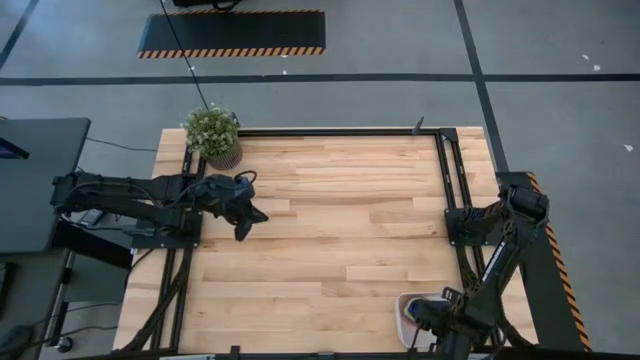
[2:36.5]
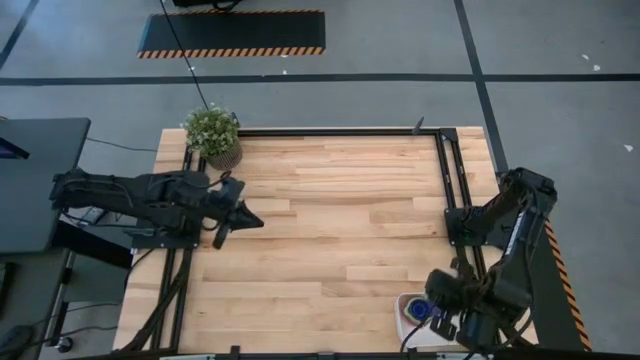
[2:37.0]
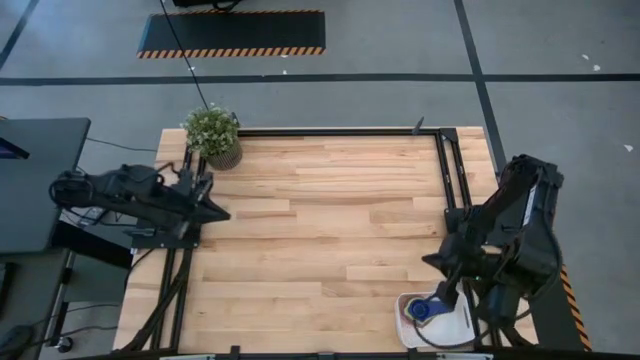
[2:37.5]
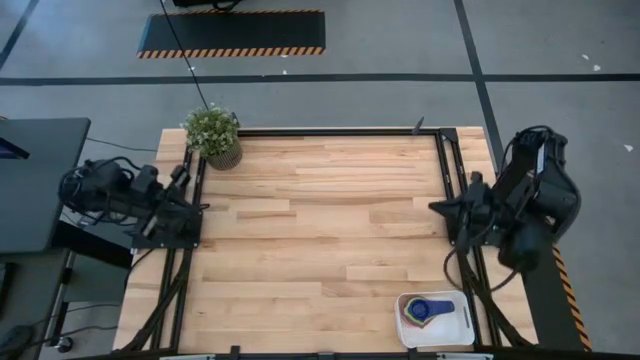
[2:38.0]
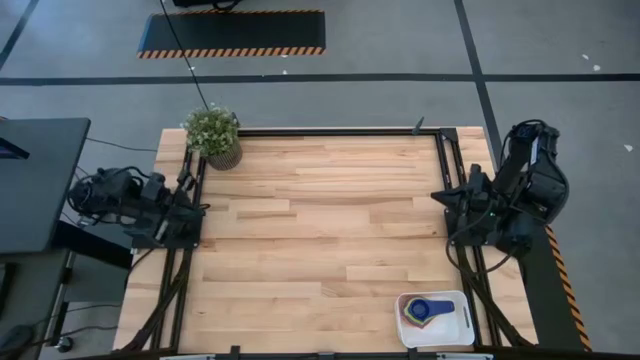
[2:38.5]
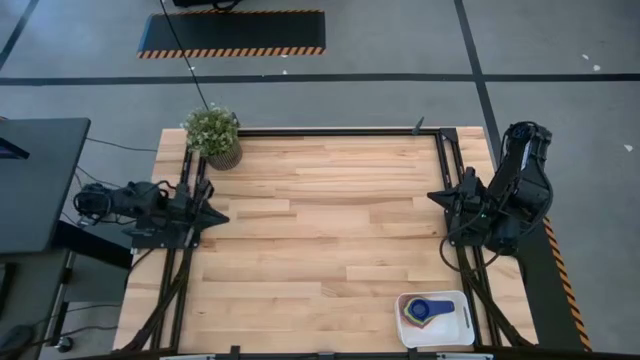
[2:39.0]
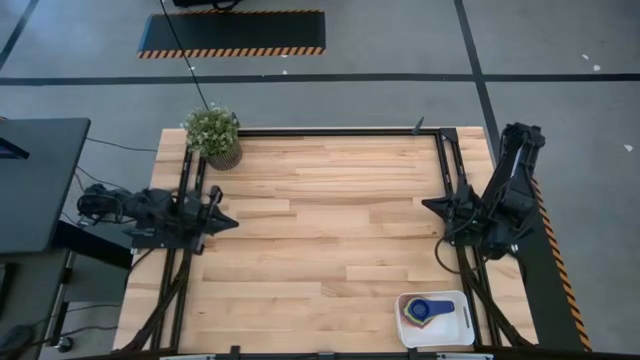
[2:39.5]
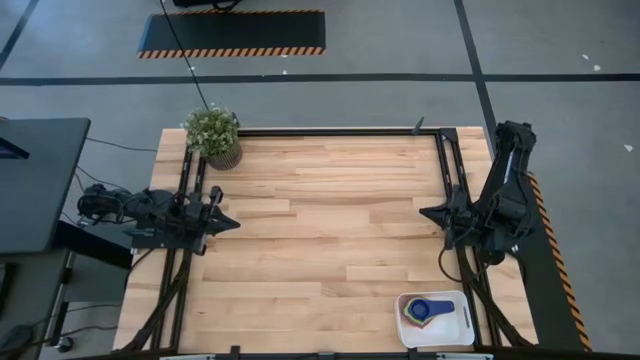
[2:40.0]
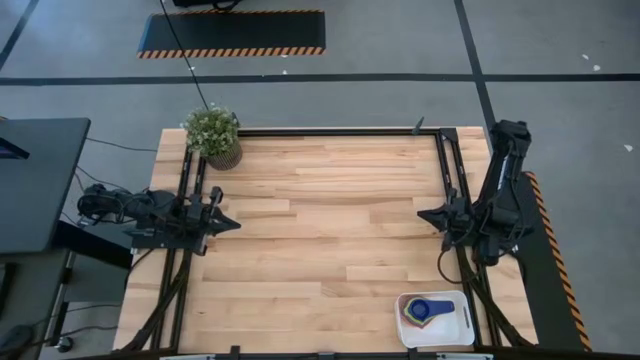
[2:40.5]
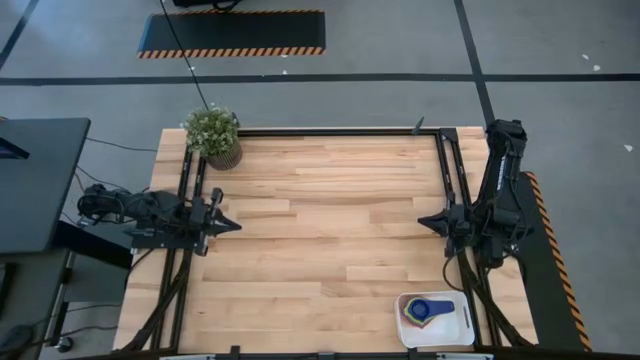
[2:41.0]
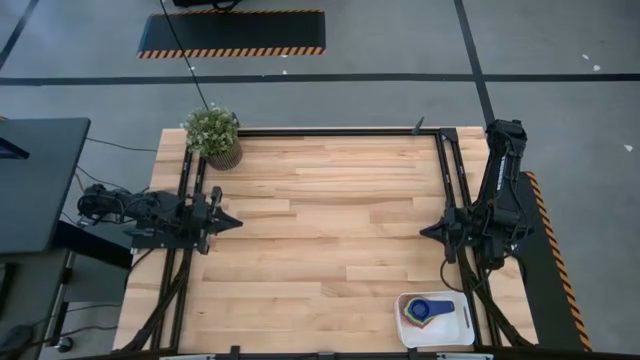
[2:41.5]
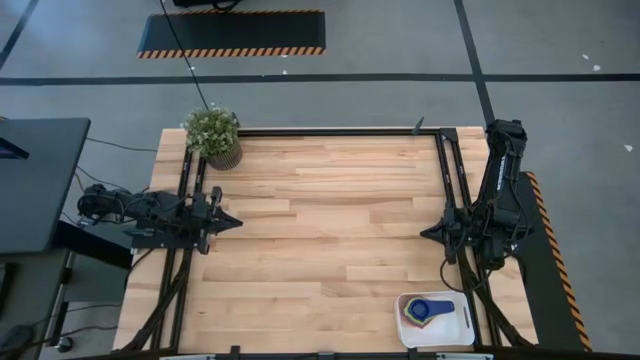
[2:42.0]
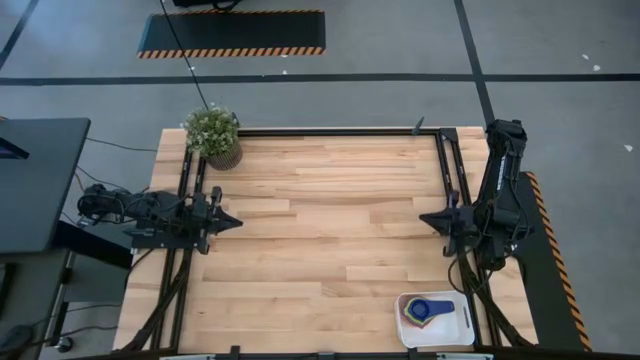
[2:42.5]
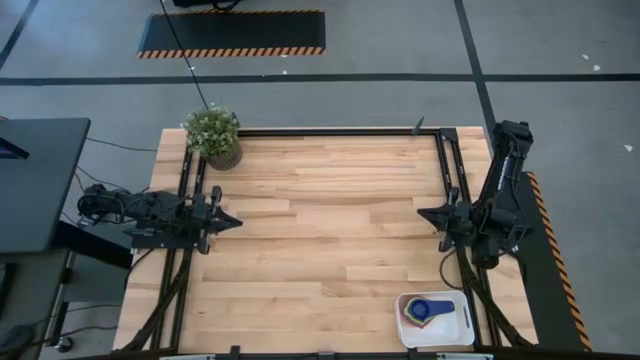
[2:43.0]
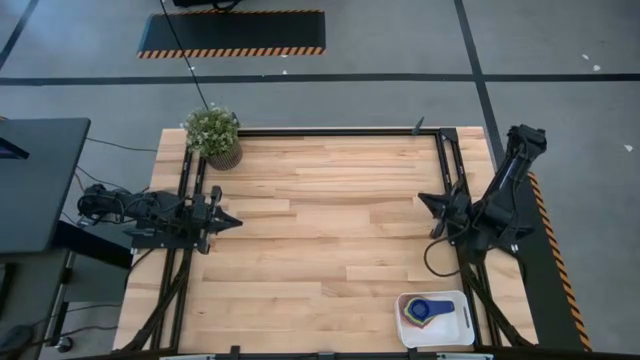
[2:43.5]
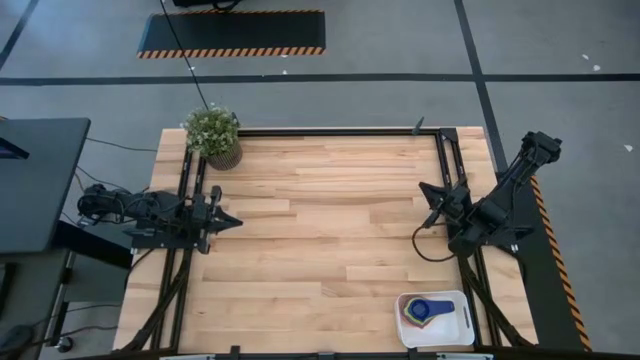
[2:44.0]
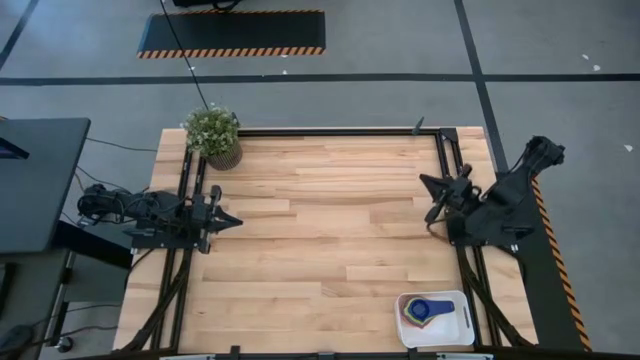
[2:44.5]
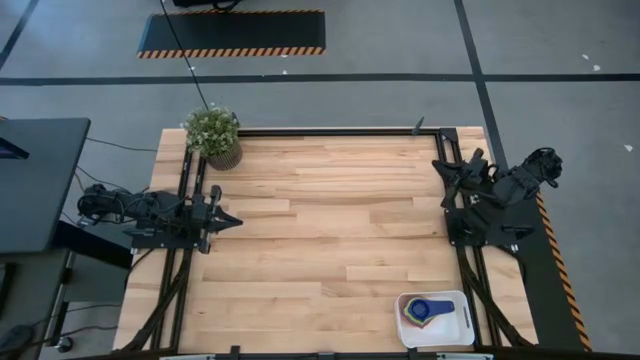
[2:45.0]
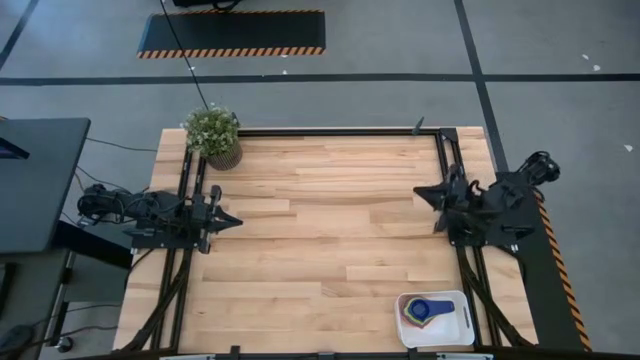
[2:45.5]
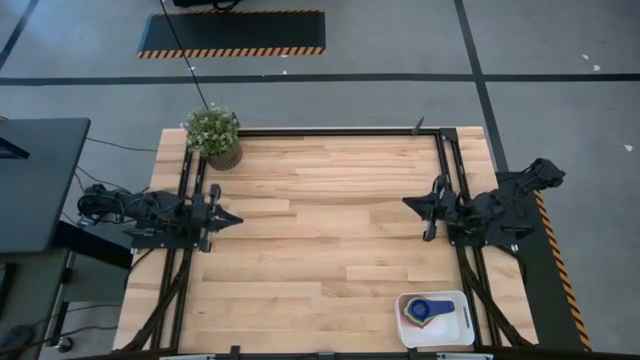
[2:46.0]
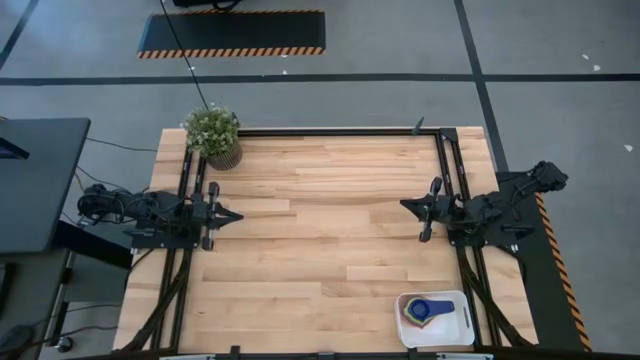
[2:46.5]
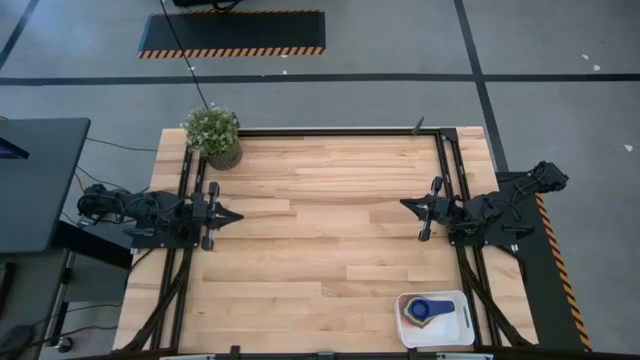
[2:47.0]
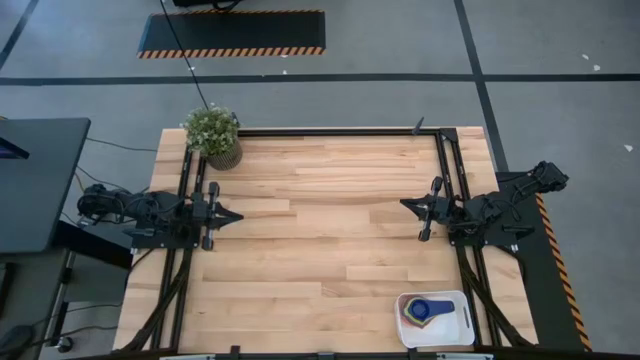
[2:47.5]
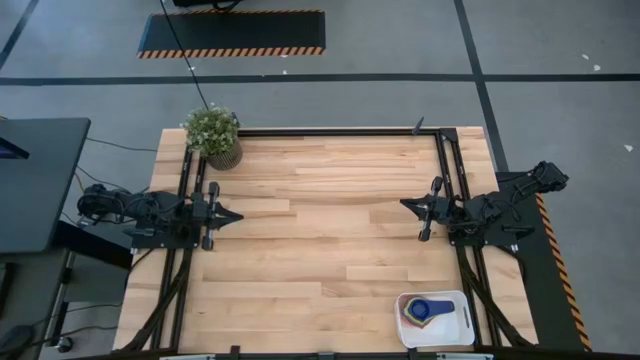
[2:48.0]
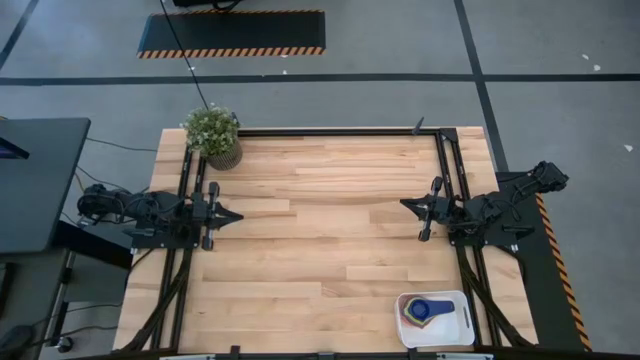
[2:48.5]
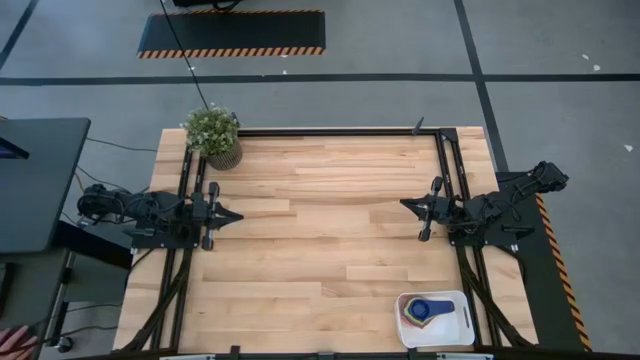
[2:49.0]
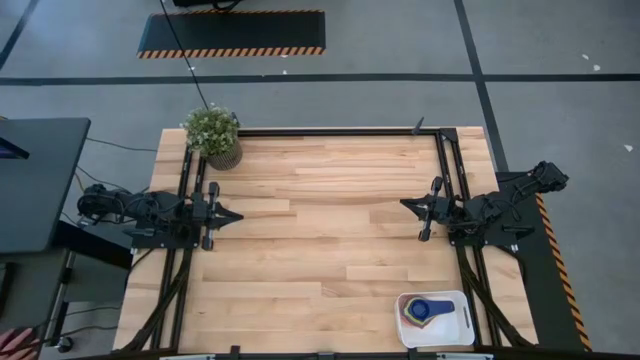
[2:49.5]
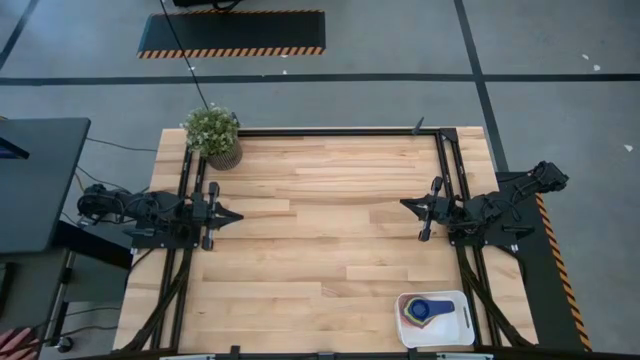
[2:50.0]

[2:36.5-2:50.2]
Task: Nest measuring cups in basket
Return to Home Position

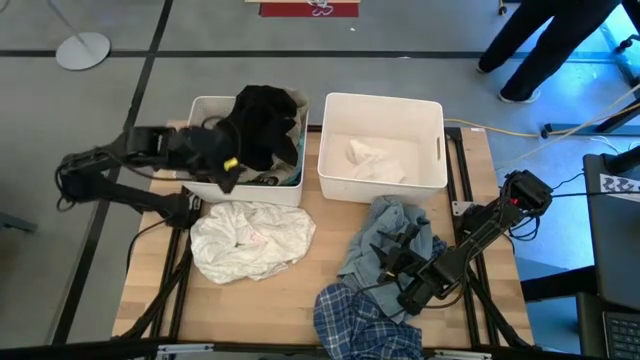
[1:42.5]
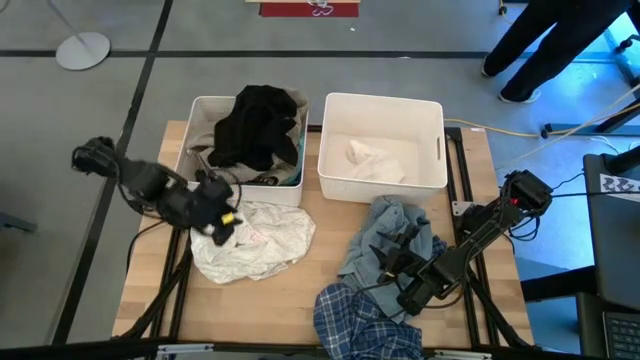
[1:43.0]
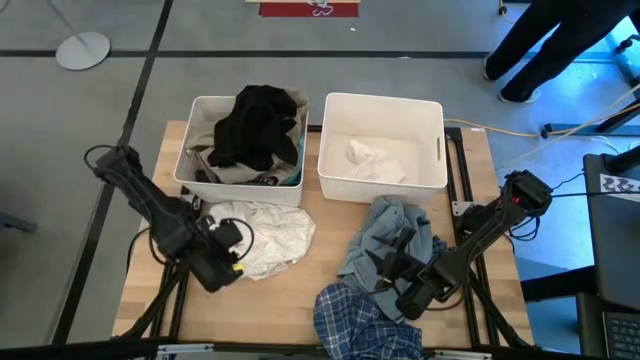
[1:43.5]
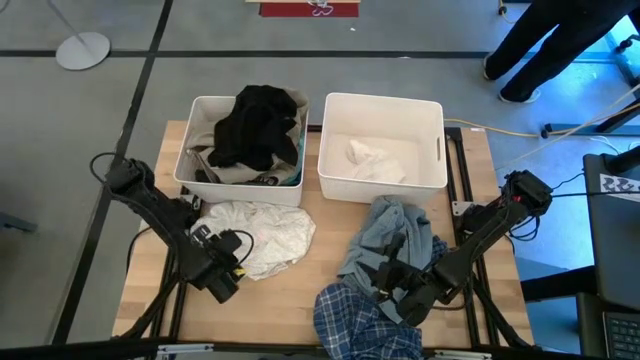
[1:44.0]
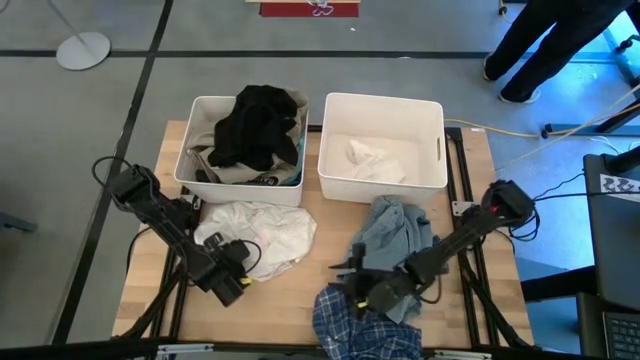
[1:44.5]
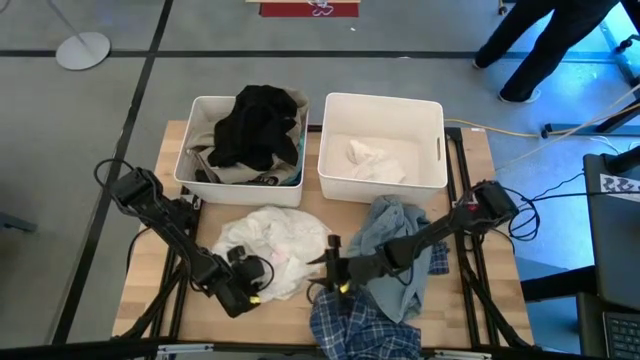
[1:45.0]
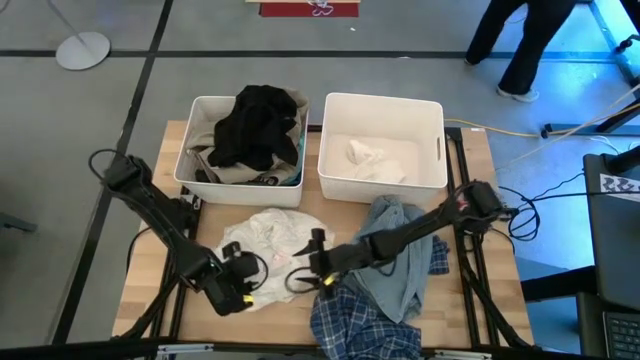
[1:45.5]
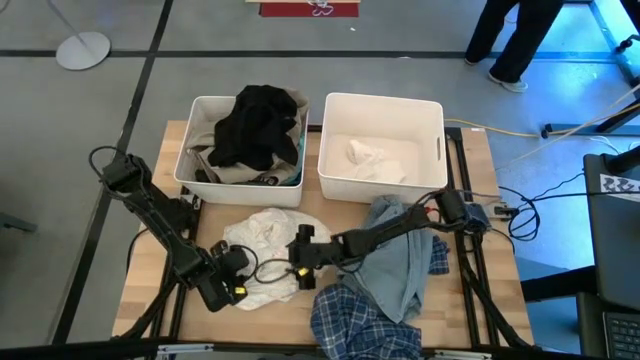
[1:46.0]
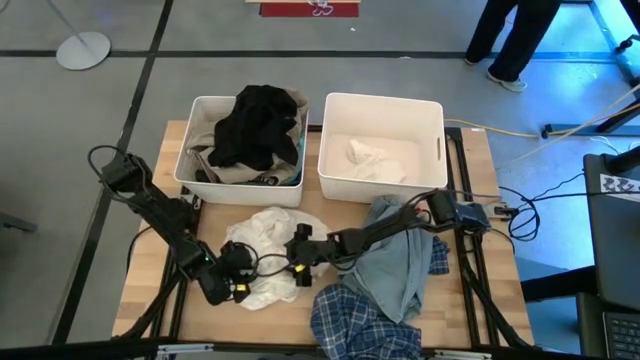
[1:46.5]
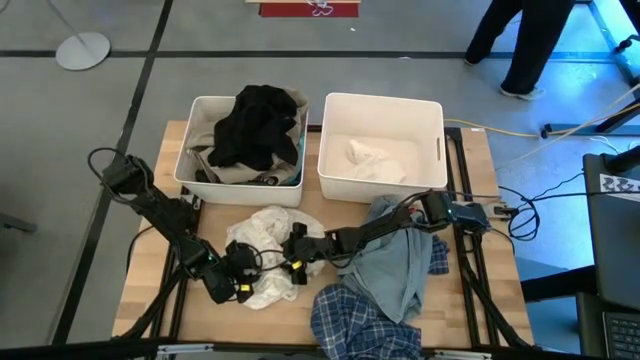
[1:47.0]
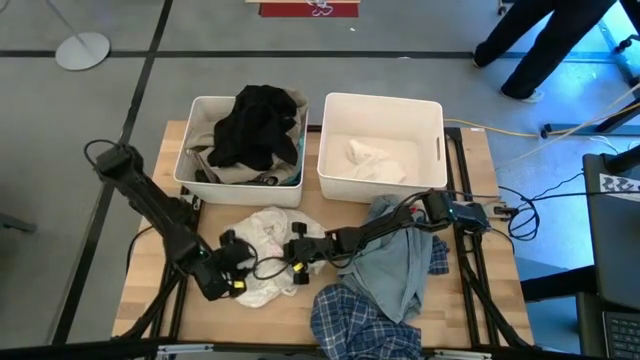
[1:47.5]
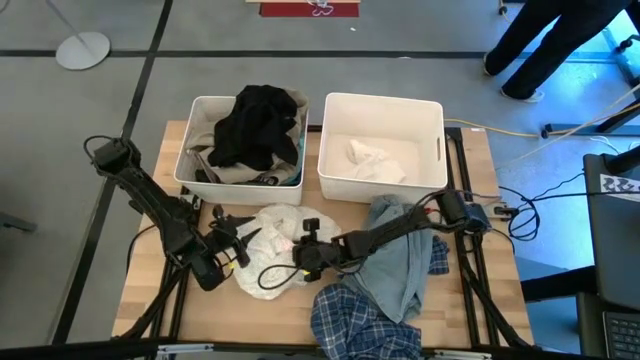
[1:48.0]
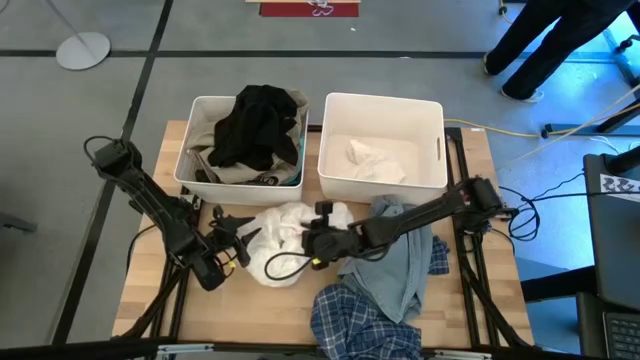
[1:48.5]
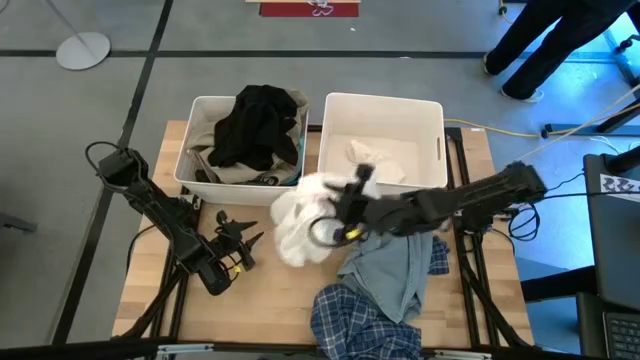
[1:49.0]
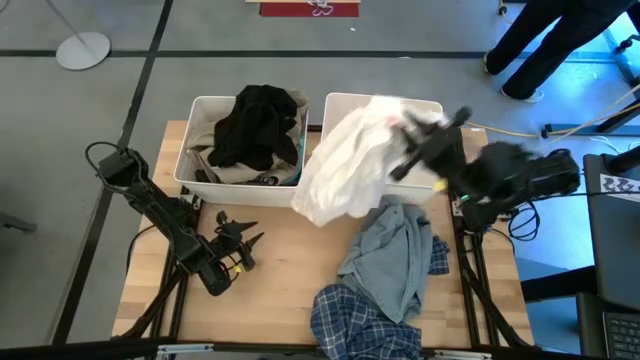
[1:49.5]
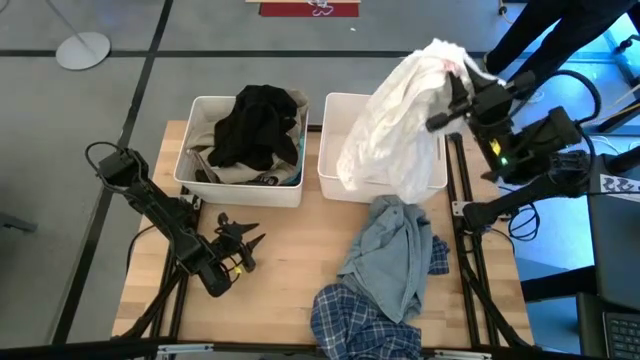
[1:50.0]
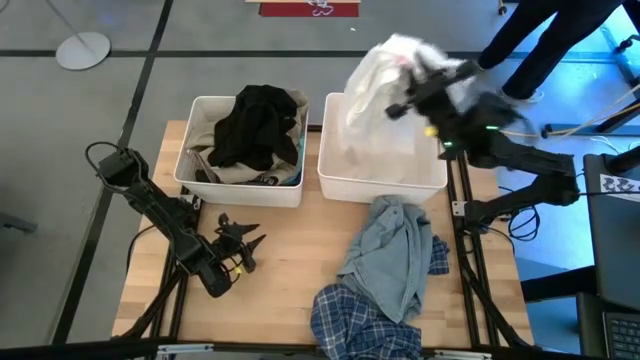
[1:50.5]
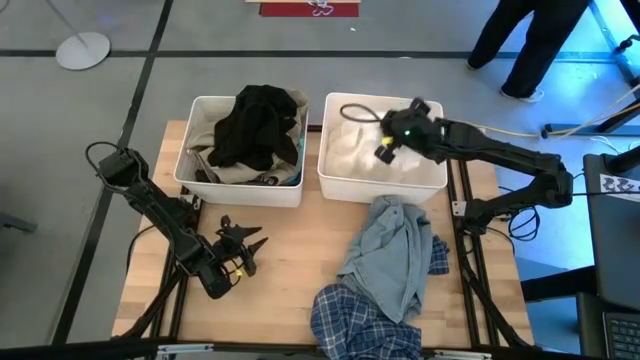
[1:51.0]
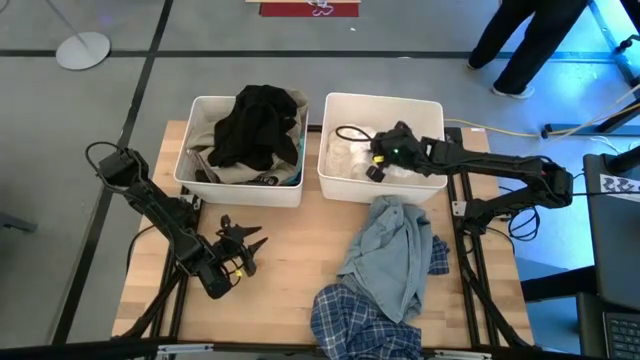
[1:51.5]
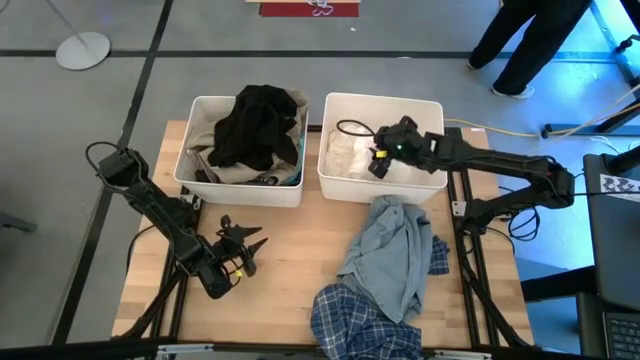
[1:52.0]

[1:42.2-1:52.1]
Task: Sort clothes
Put the white shirt into the right white bin
